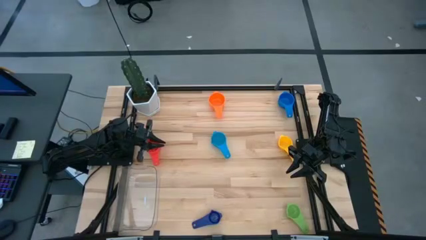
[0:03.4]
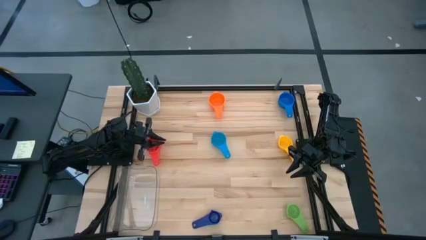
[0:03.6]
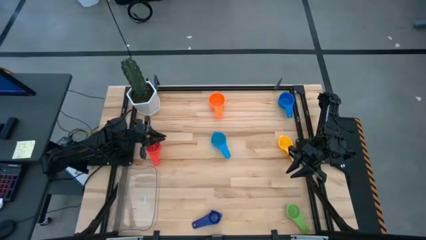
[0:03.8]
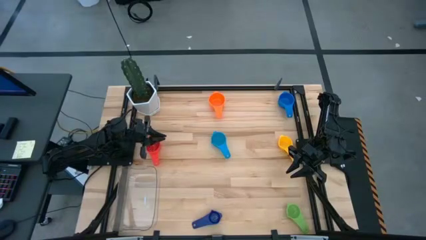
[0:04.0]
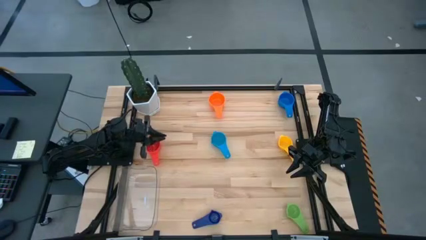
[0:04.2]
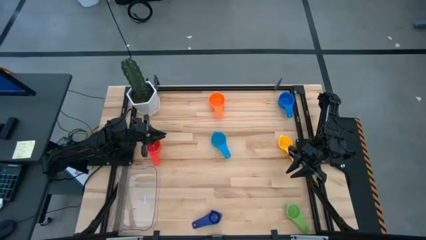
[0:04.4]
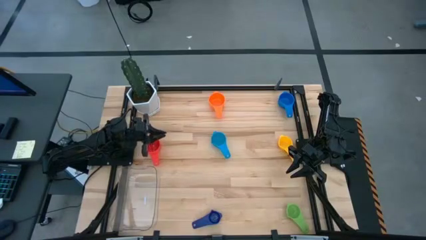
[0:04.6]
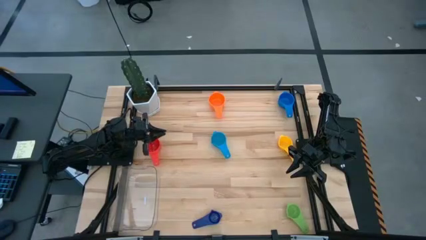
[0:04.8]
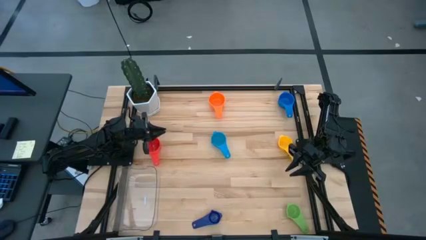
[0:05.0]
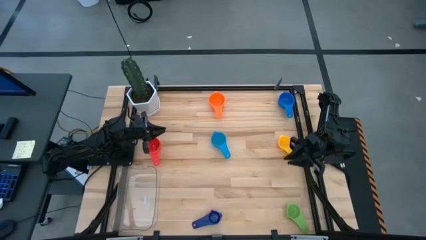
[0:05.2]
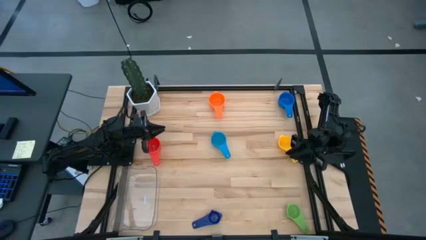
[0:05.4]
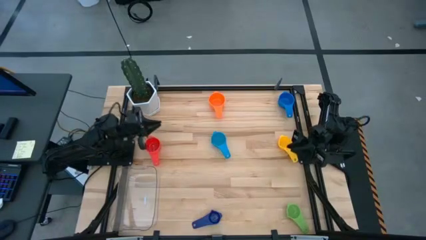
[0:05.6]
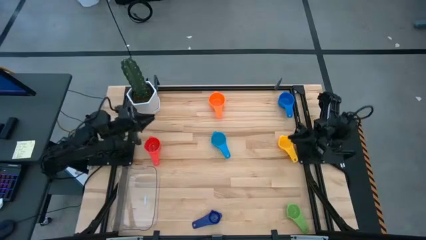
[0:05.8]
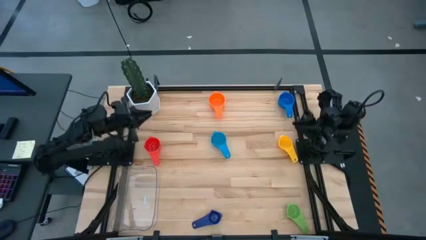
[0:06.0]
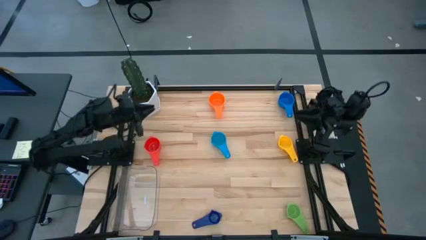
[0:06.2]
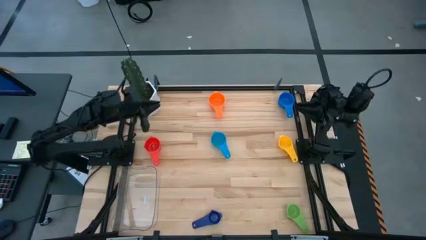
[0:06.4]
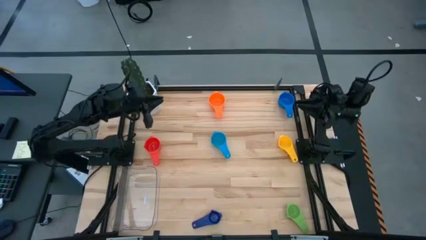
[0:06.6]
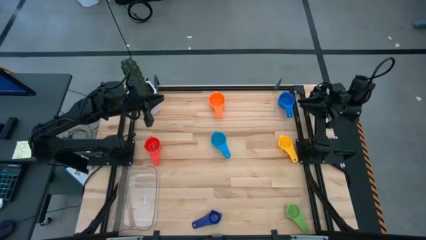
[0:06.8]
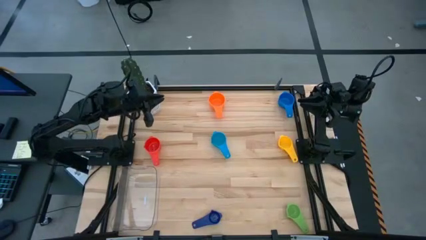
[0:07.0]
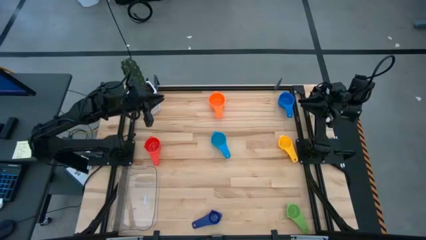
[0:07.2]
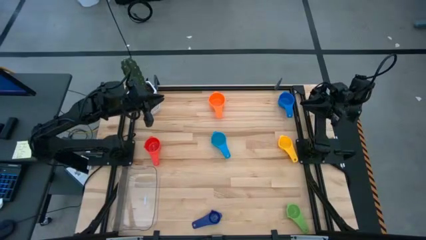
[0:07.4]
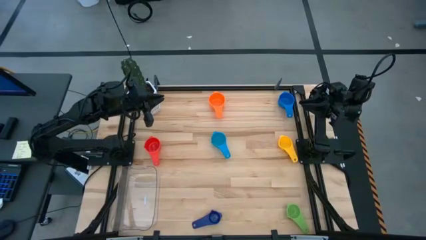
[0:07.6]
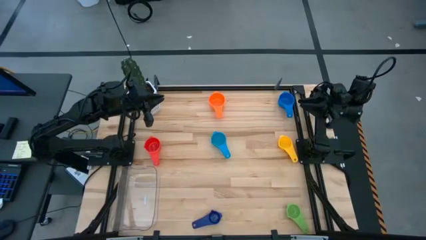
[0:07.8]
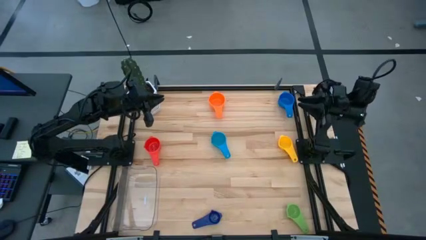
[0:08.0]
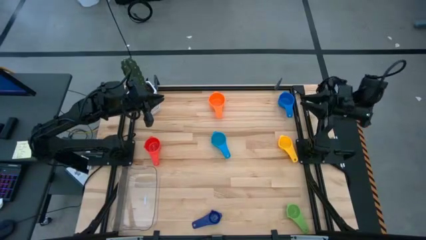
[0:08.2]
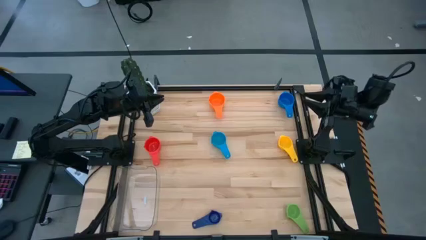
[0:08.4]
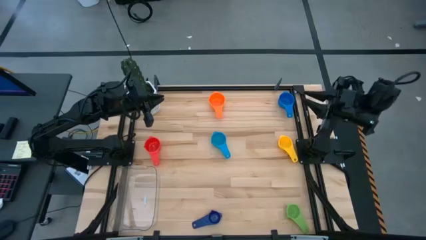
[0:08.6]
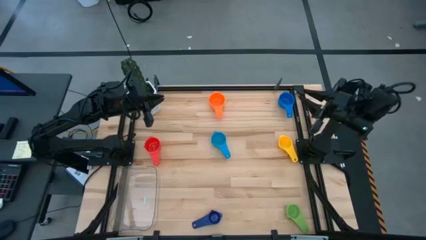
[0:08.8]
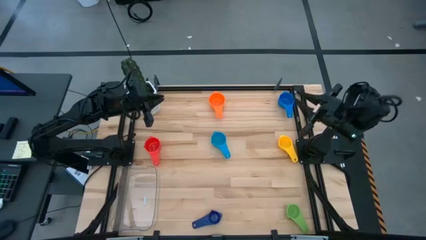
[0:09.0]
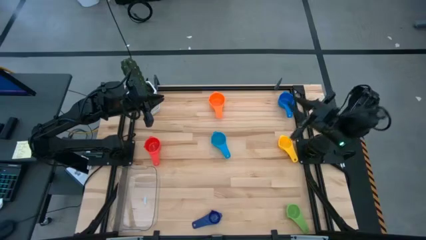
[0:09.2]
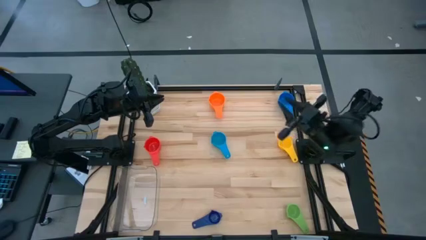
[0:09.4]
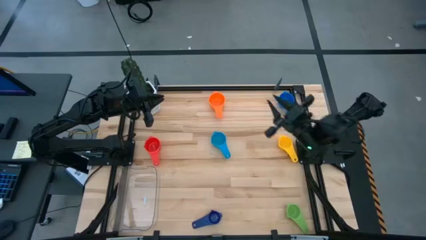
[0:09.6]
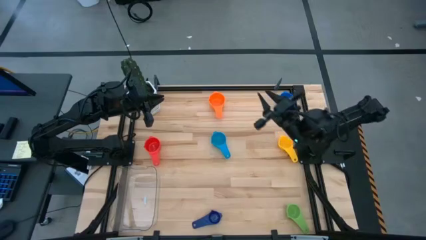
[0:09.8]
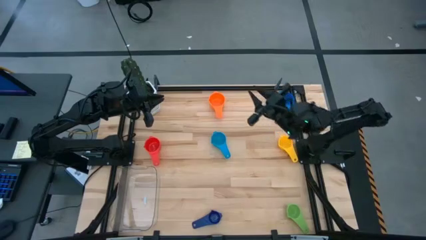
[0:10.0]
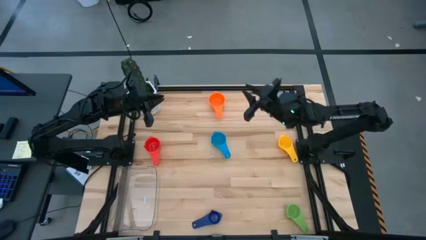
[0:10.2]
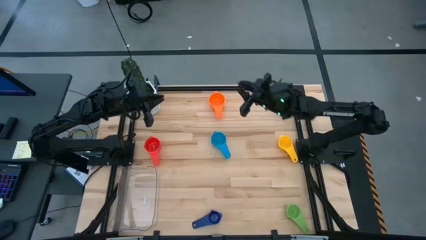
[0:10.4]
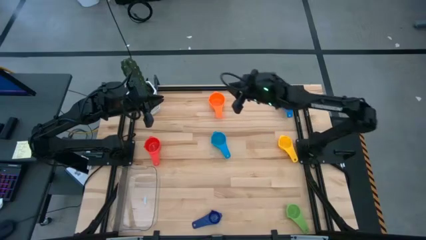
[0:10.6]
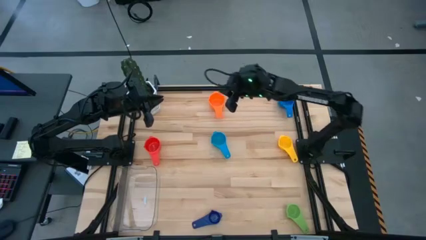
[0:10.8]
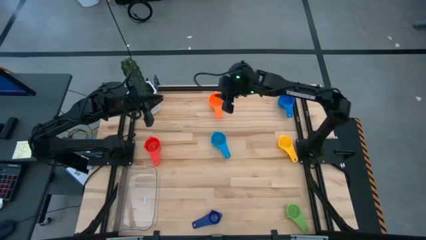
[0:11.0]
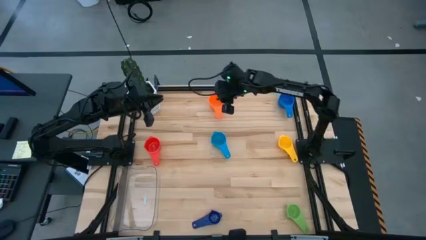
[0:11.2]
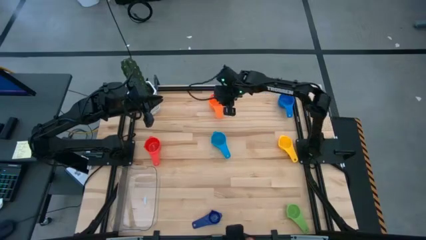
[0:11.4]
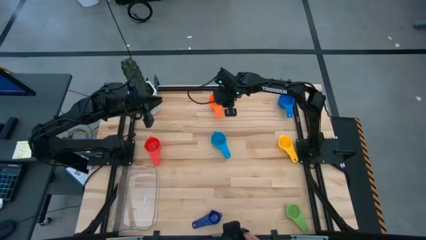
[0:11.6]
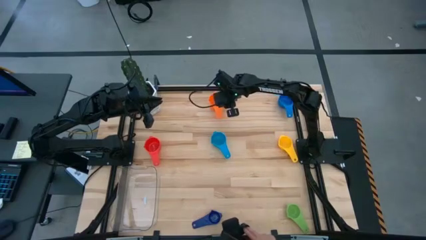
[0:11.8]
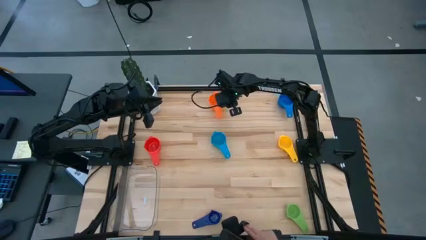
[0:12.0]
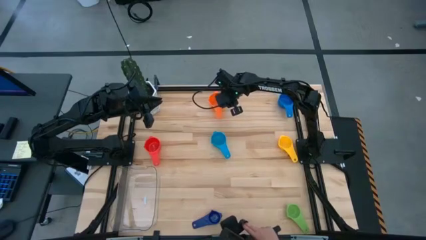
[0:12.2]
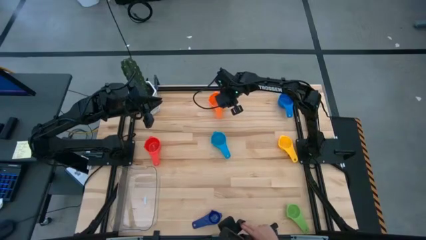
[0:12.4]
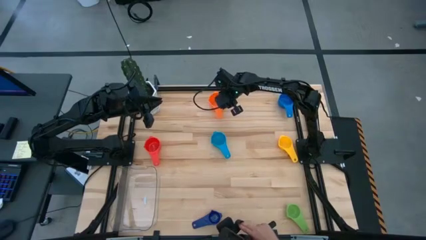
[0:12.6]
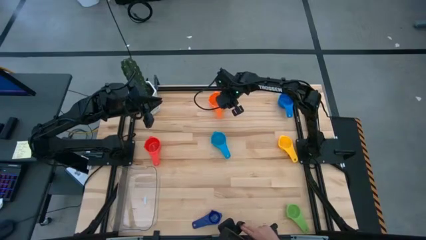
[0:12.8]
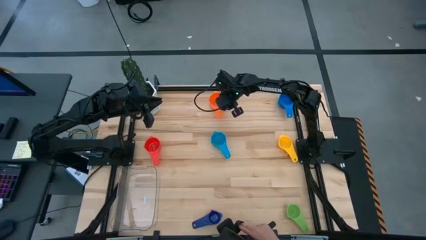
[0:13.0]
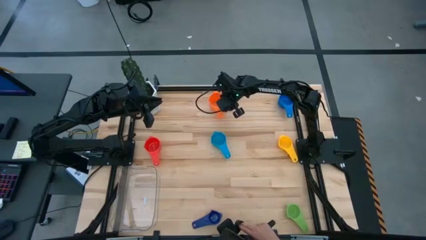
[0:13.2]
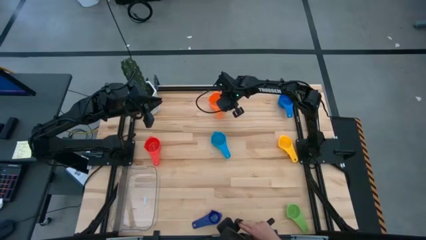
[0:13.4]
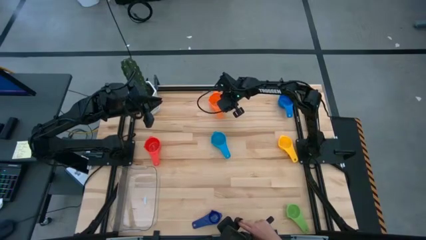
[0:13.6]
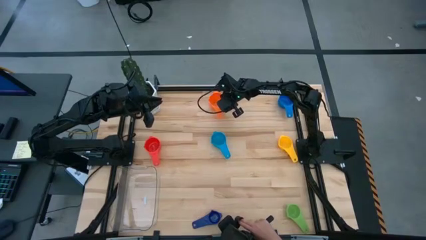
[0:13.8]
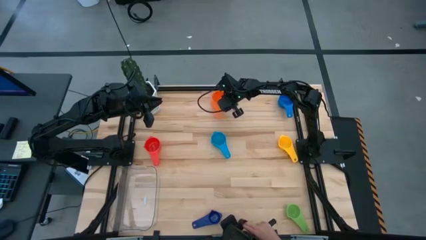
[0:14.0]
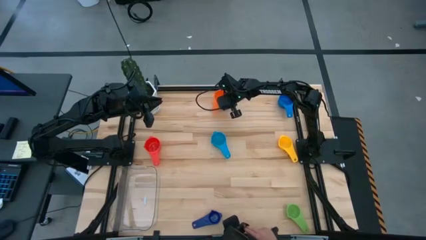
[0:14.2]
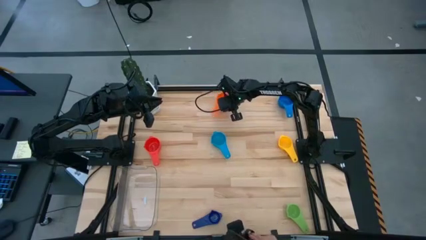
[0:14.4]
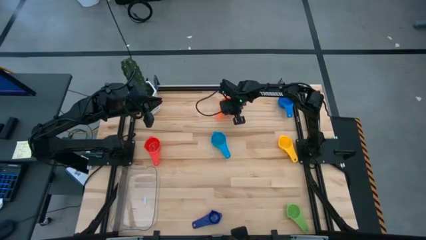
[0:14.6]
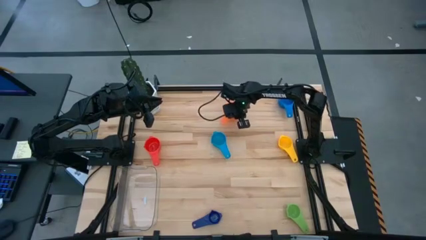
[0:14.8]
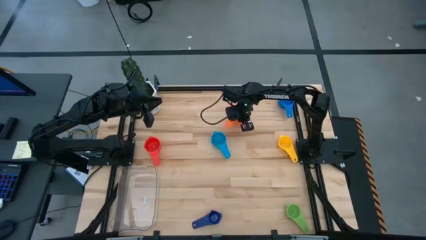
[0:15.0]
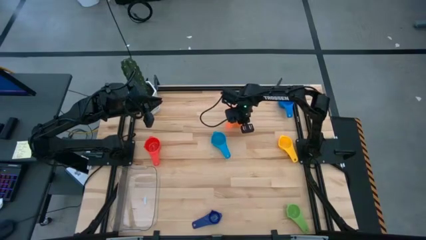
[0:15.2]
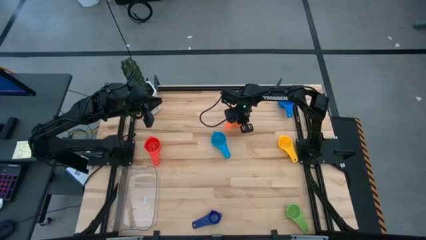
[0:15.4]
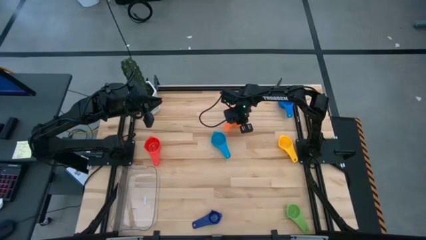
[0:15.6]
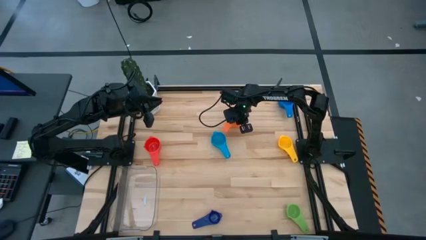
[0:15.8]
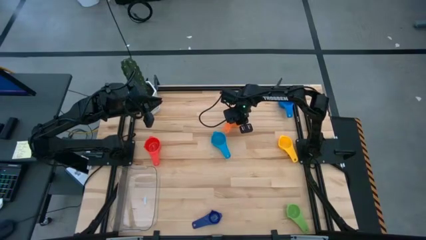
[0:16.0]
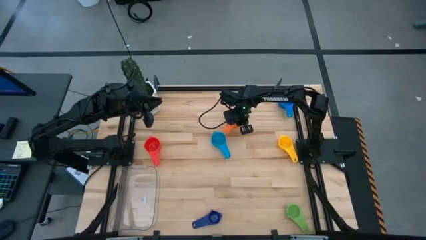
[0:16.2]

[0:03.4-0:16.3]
Task: Nest measuring cups in basket
Adjust the orange measuring cup
